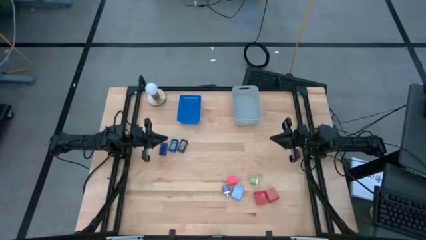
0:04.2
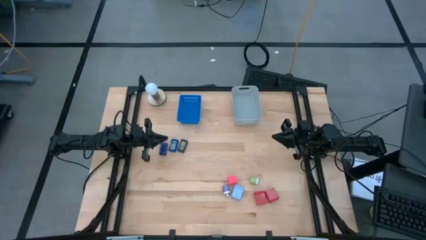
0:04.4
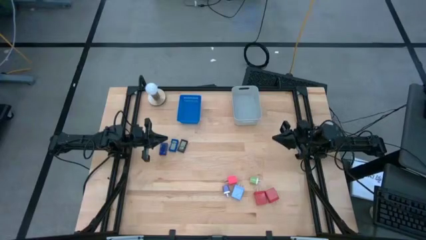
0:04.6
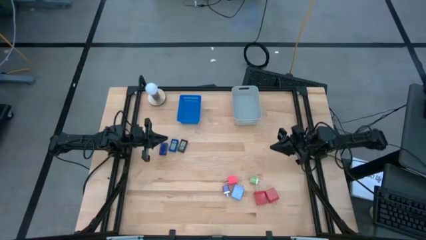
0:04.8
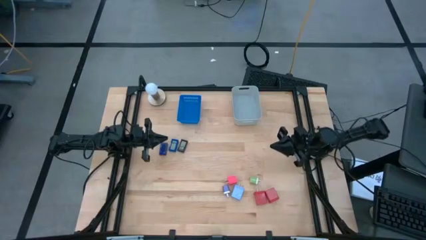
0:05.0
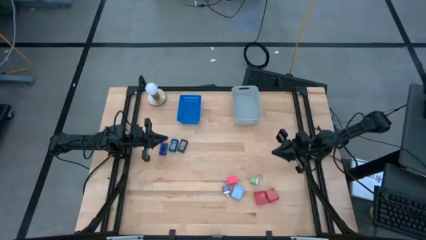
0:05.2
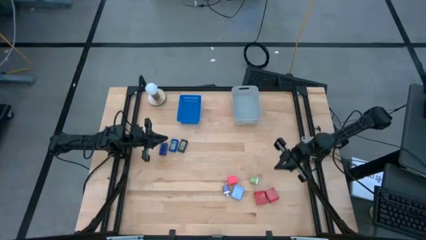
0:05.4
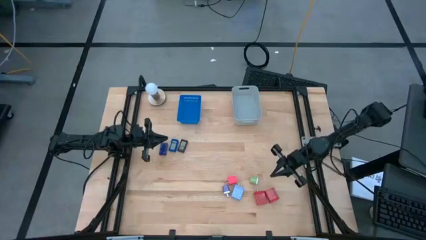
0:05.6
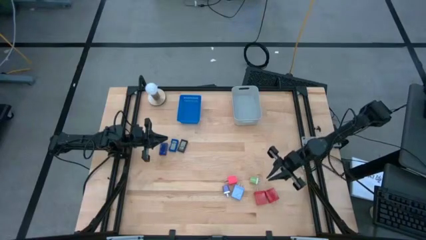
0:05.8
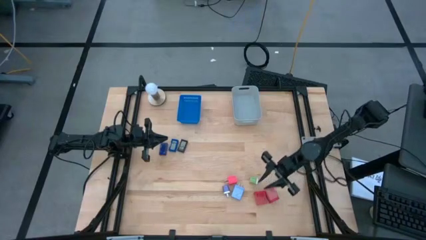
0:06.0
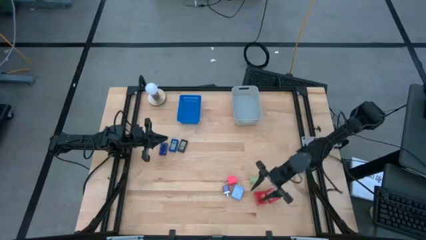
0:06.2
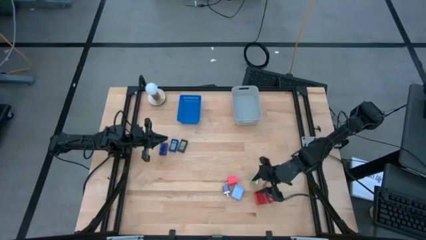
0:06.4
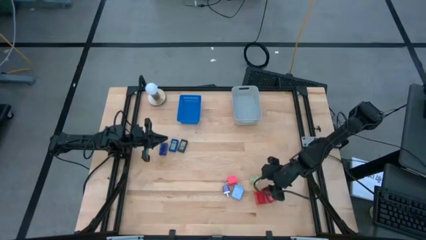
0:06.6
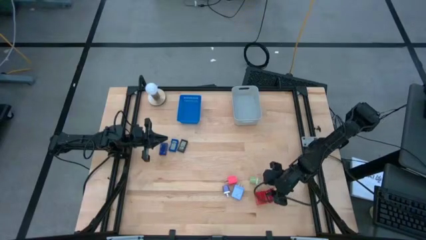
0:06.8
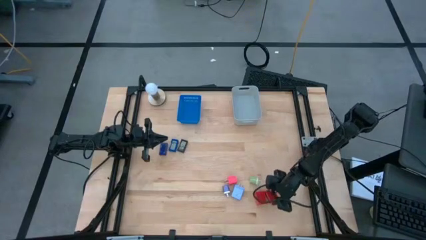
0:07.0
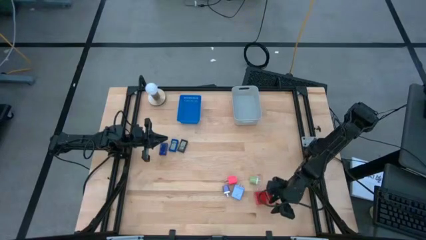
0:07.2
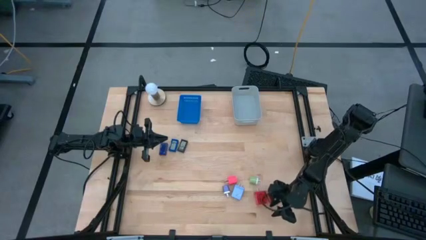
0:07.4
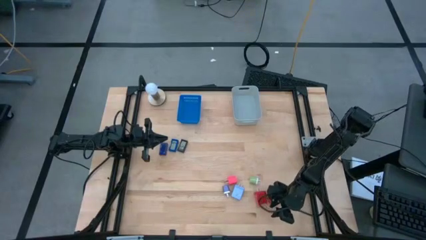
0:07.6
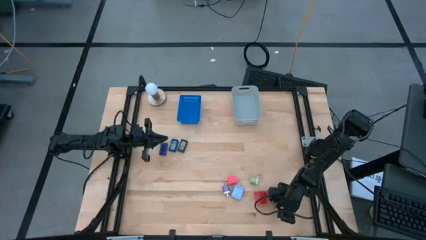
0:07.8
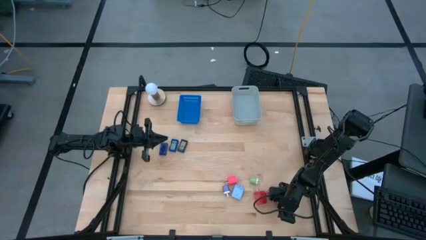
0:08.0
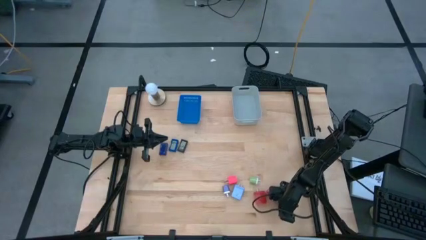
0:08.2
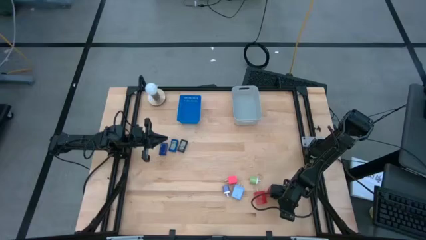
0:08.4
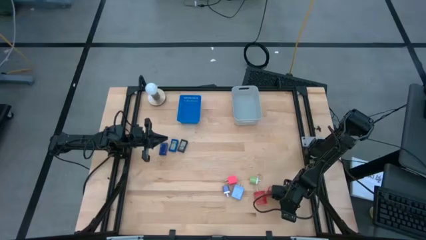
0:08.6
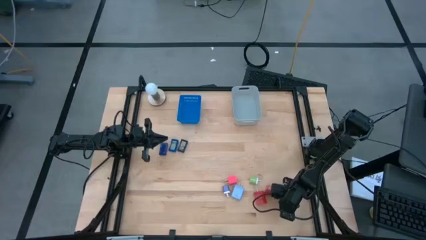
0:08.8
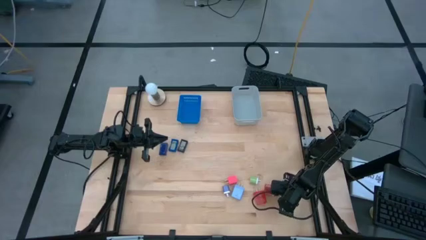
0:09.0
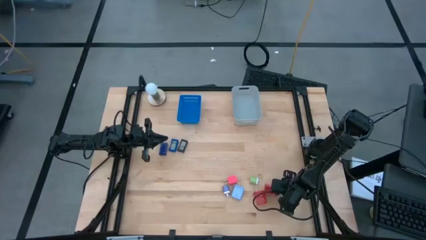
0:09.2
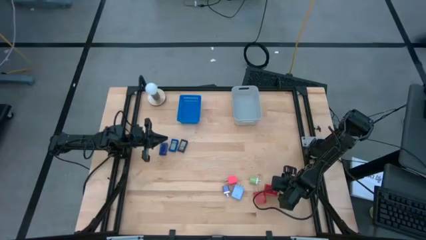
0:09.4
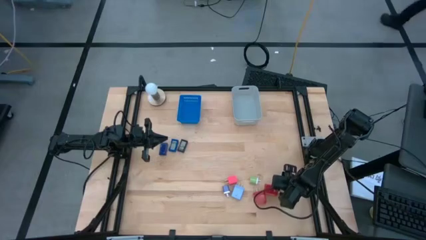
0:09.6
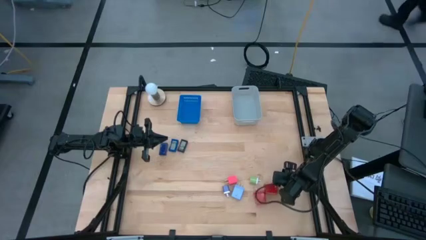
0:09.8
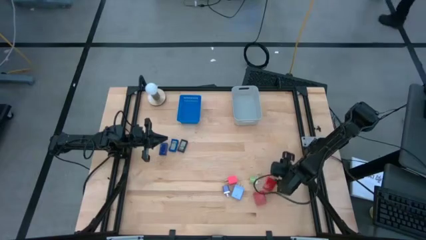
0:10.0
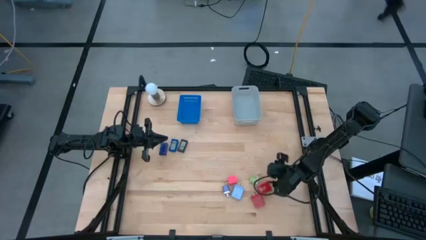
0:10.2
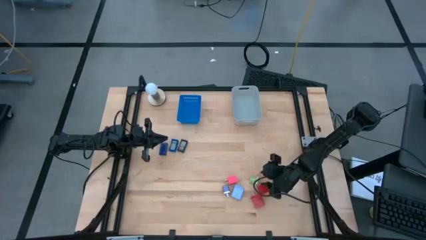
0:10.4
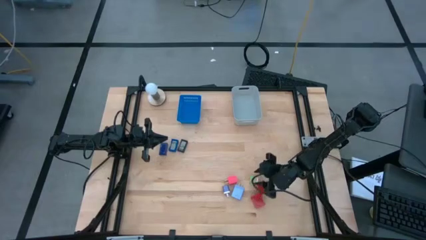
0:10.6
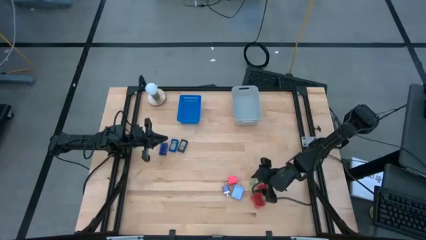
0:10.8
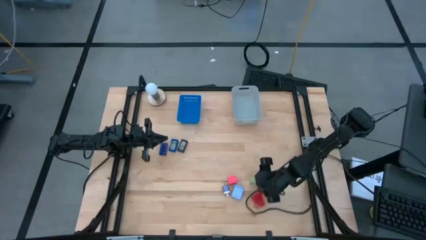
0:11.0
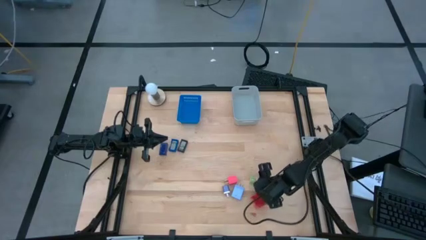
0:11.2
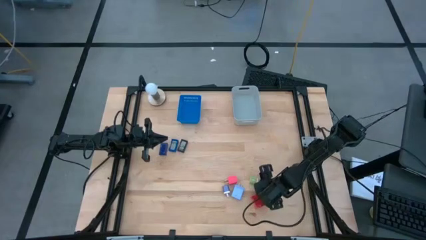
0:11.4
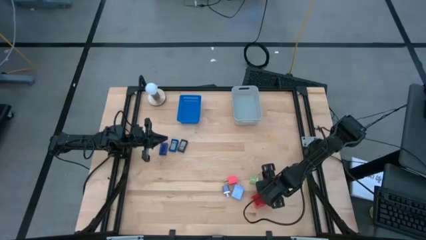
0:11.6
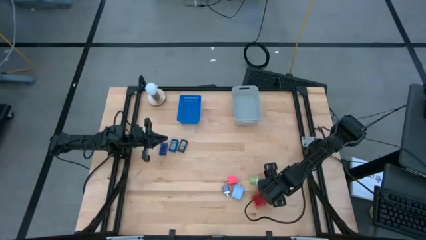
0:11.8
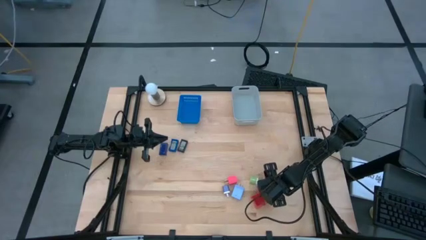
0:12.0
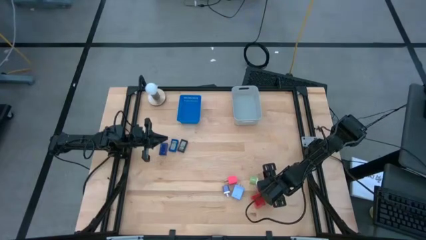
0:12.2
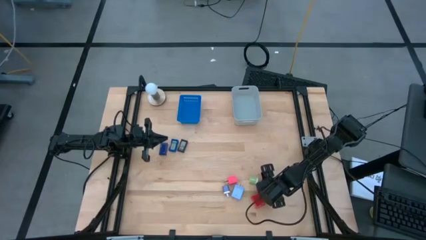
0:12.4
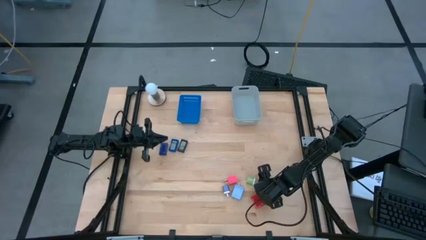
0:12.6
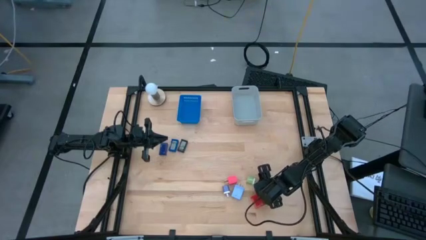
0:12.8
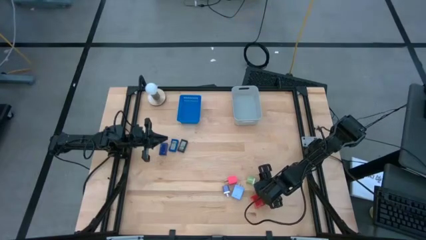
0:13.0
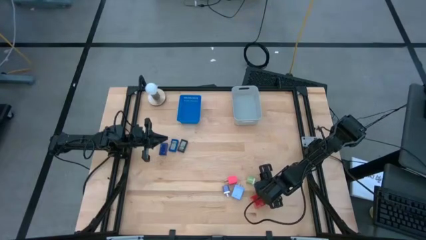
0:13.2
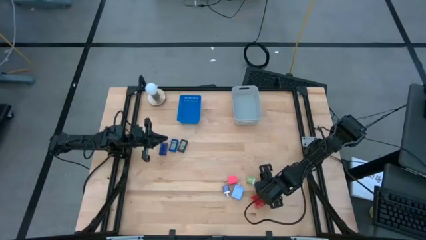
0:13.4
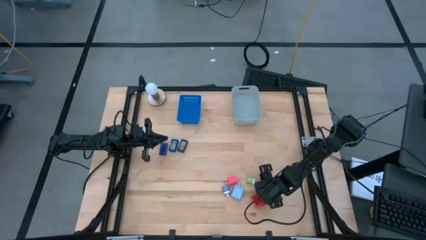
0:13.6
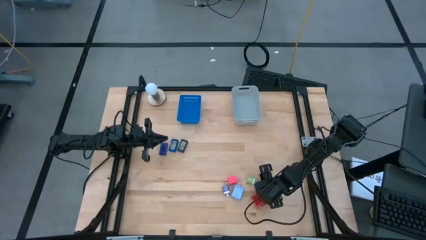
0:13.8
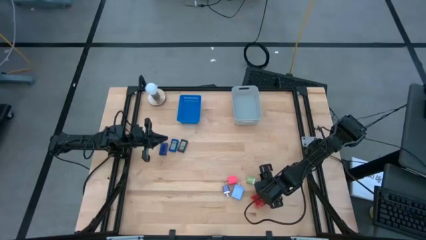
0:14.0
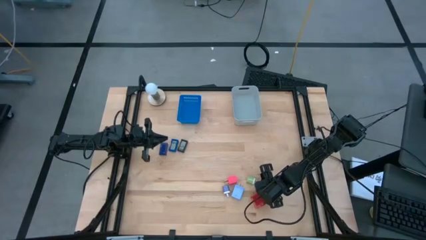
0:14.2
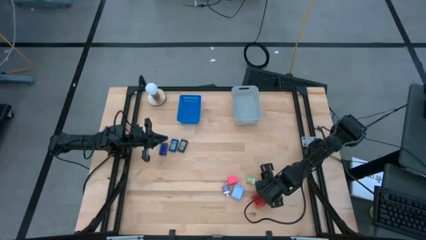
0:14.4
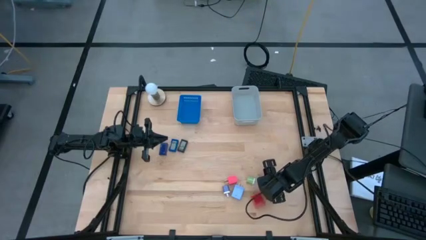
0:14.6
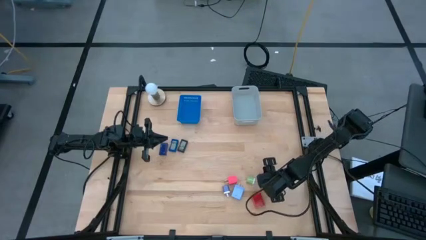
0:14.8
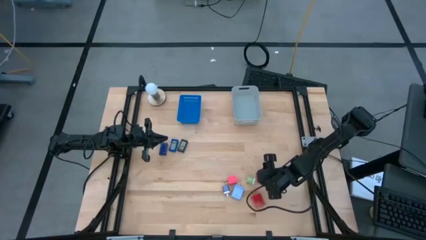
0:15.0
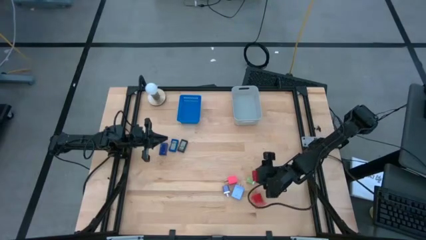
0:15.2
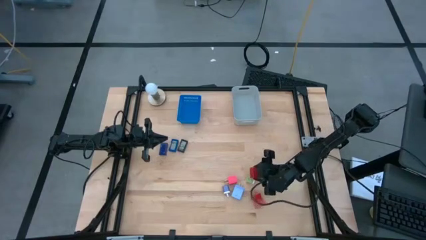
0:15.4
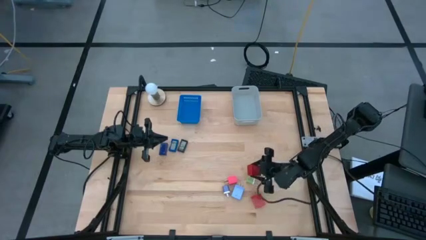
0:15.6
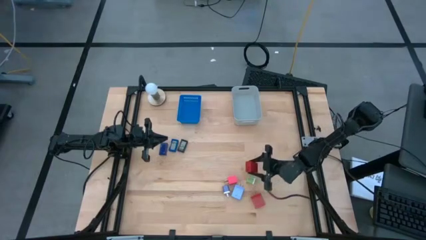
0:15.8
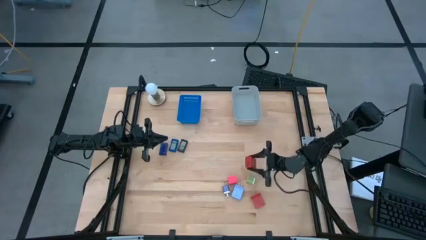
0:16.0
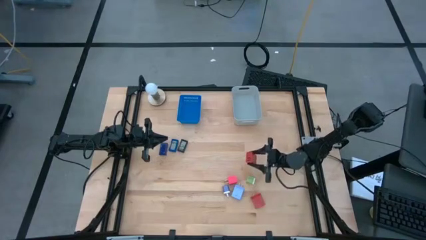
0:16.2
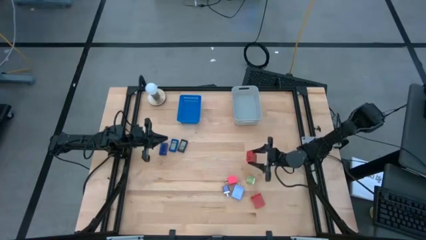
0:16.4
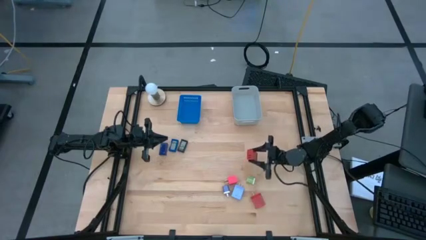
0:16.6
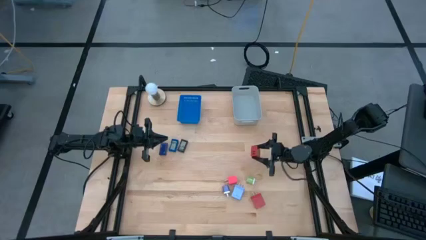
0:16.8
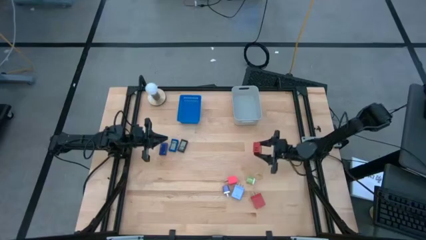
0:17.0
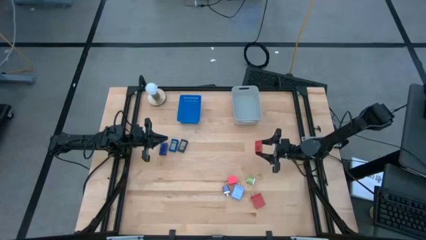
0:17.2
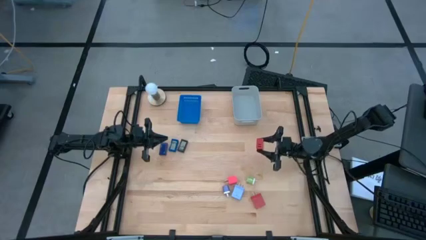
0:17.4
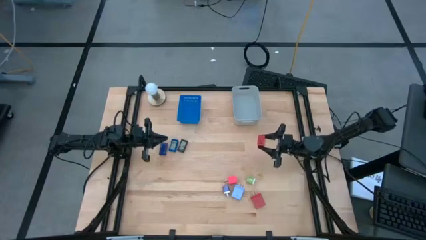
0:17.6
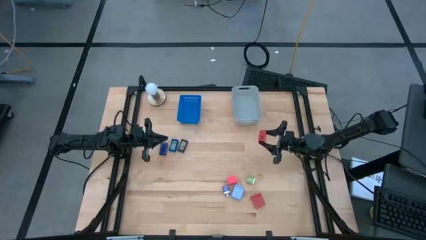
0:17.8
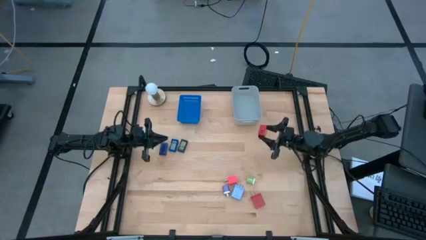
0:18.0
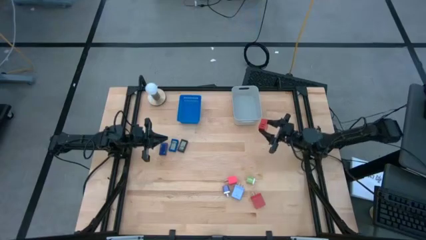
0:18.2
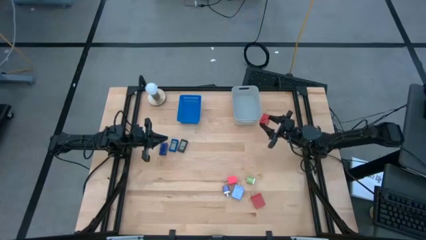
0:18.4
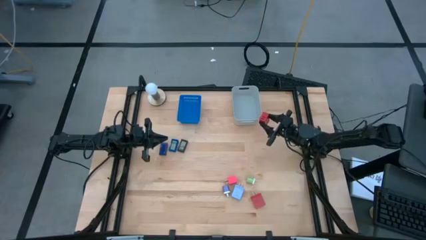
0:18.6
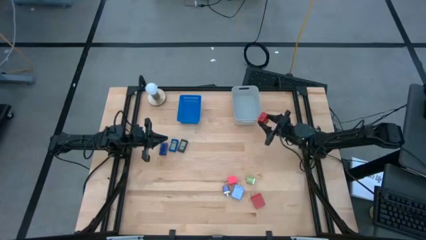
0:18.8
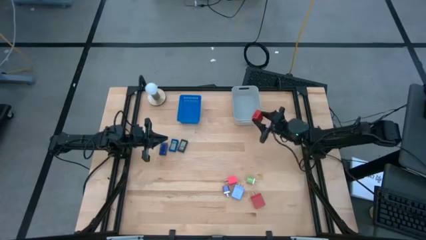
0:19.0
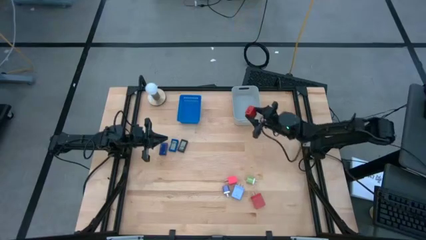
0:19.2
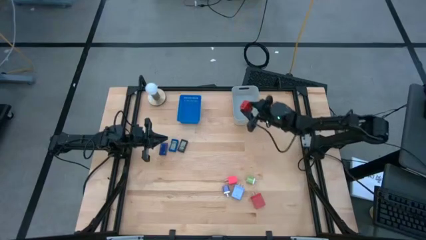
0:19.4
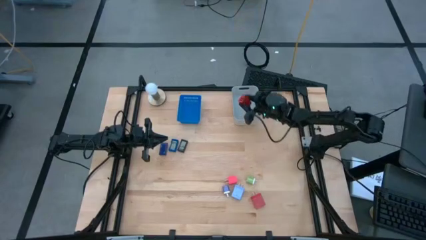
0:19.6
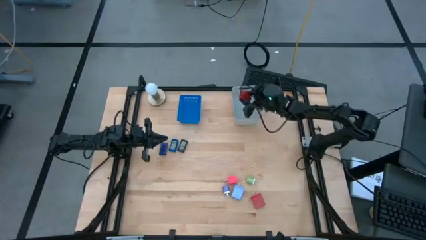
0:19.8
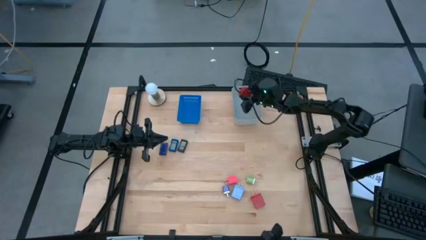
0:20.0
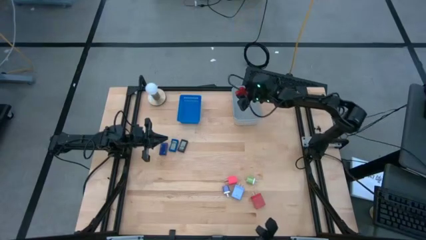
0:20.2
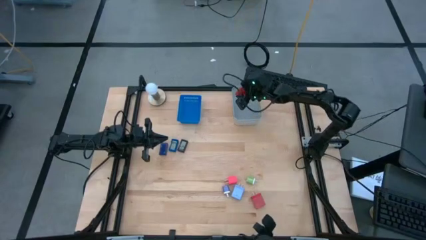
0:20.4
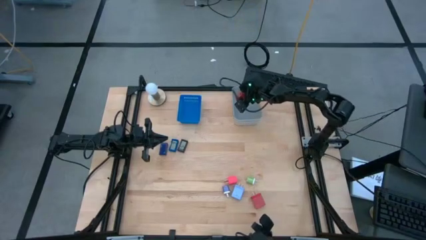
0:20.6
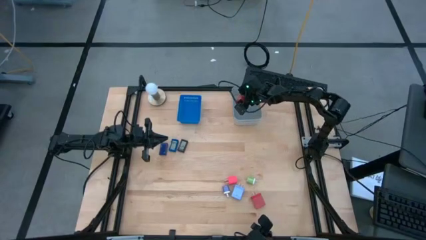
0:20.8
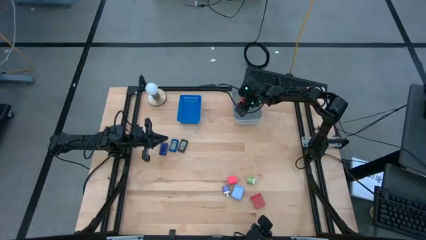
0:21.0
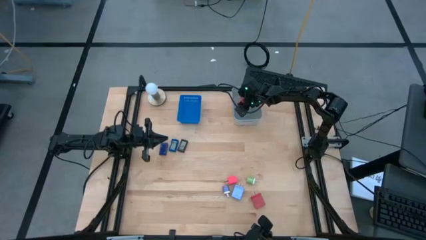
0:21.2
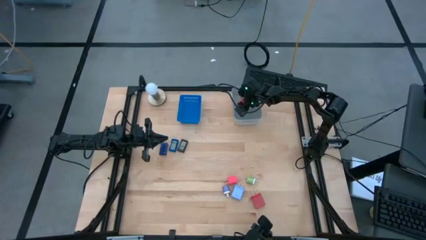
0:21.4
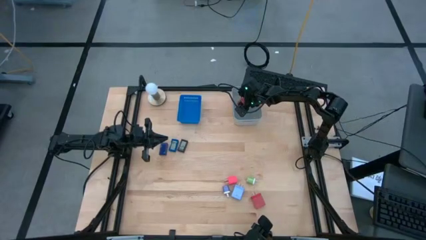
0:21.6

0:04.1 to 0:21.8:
Task: Pick & Place Office items
Put the right red charger adapter into the gray bin
